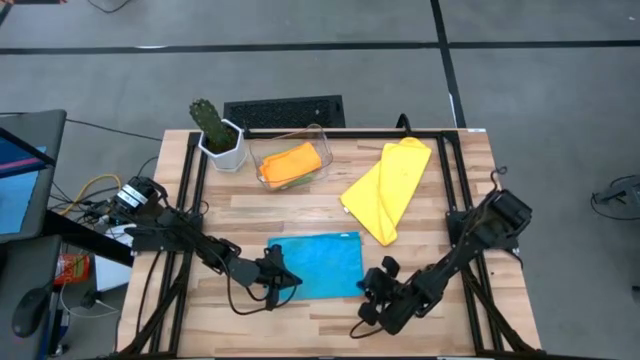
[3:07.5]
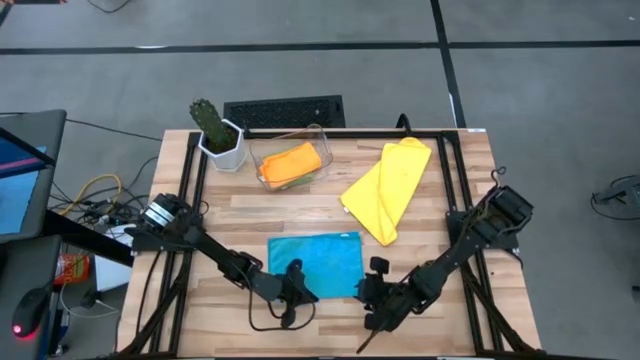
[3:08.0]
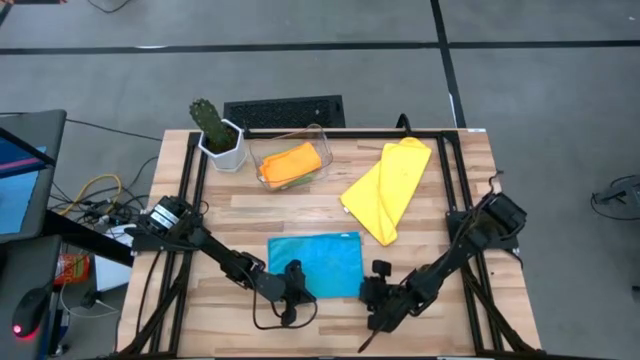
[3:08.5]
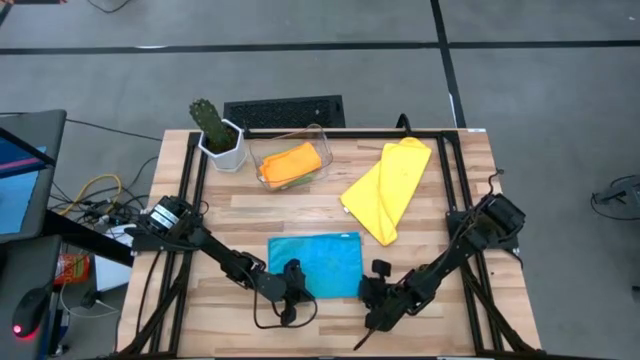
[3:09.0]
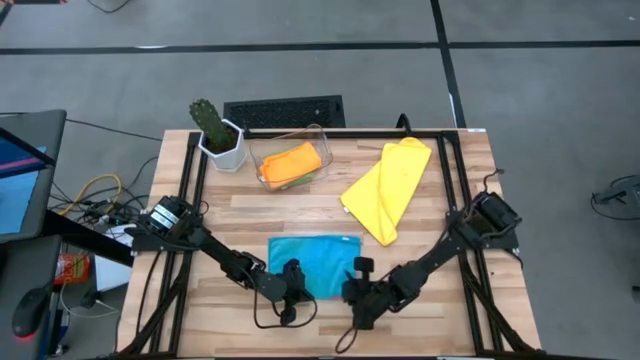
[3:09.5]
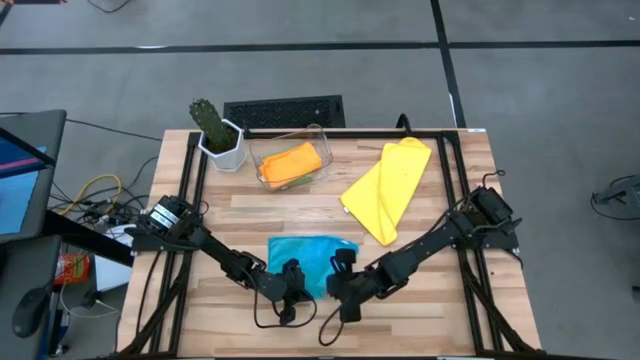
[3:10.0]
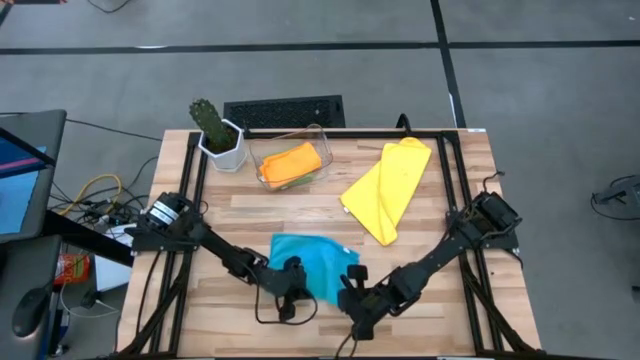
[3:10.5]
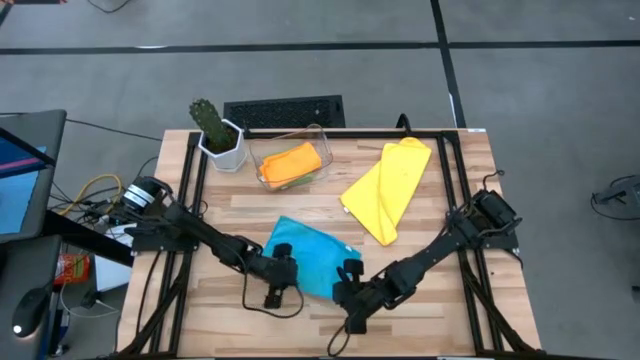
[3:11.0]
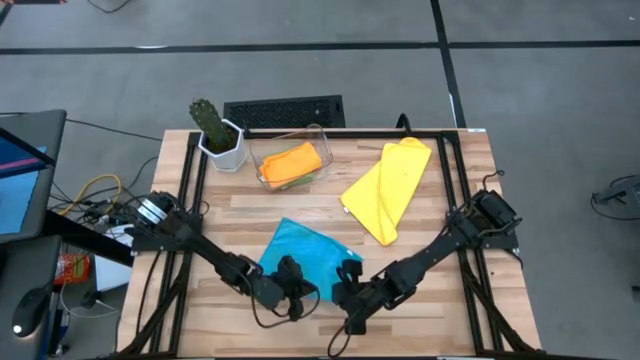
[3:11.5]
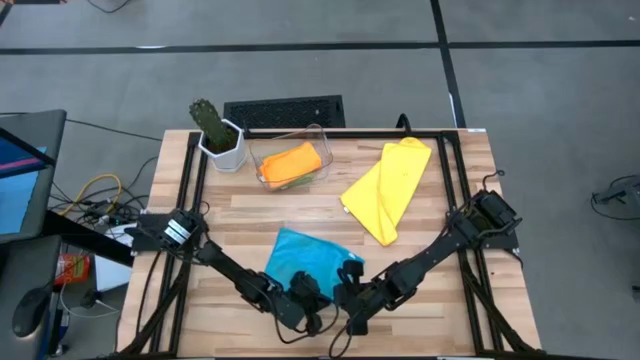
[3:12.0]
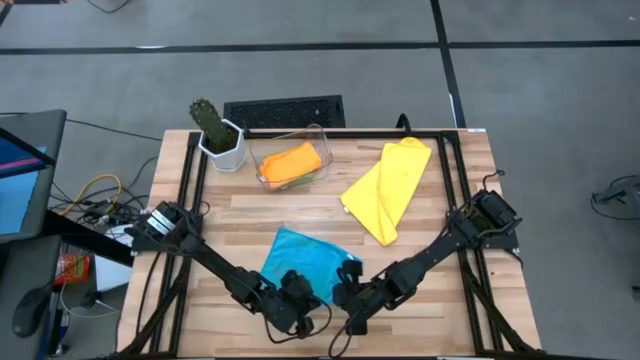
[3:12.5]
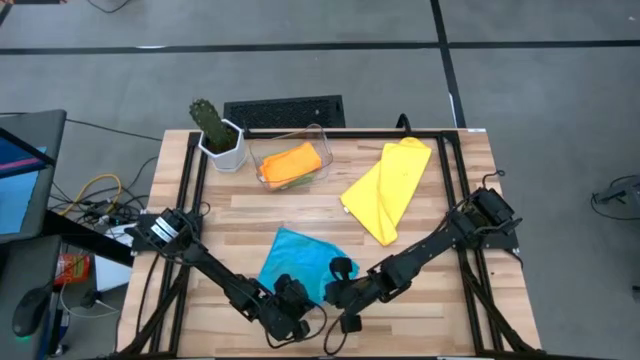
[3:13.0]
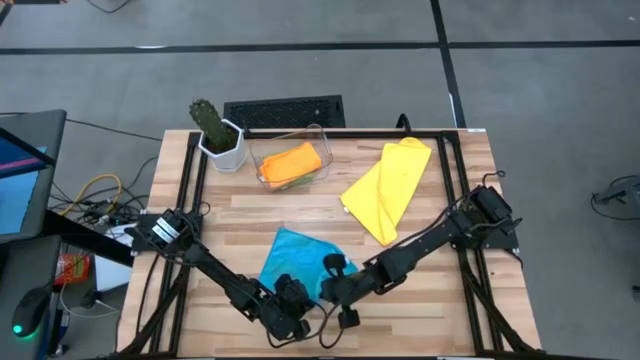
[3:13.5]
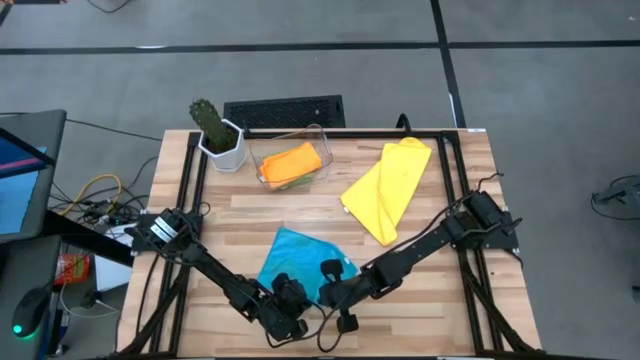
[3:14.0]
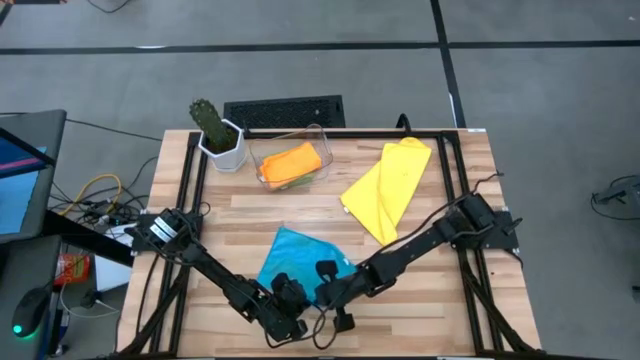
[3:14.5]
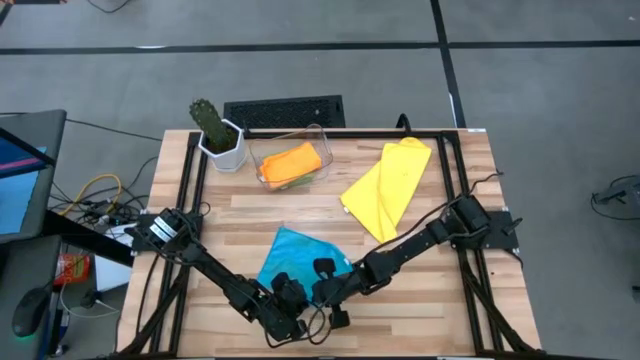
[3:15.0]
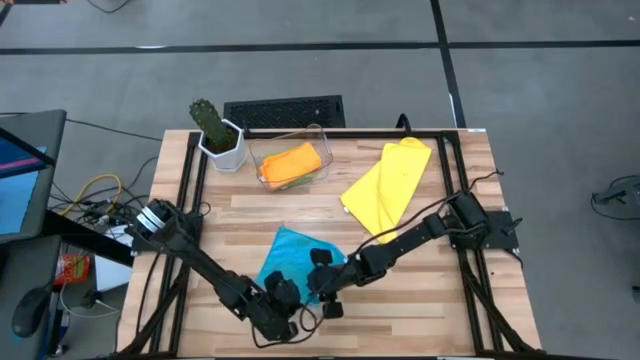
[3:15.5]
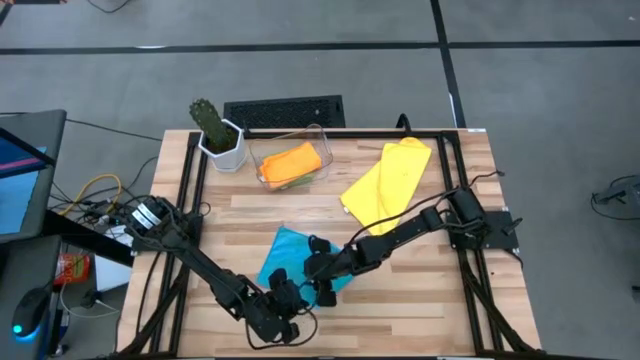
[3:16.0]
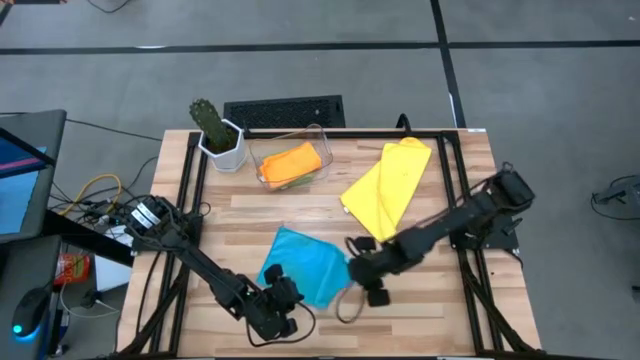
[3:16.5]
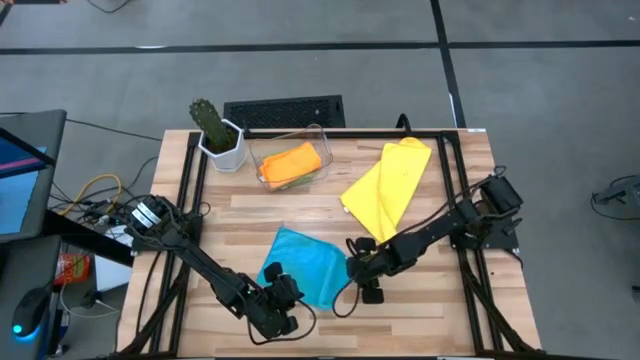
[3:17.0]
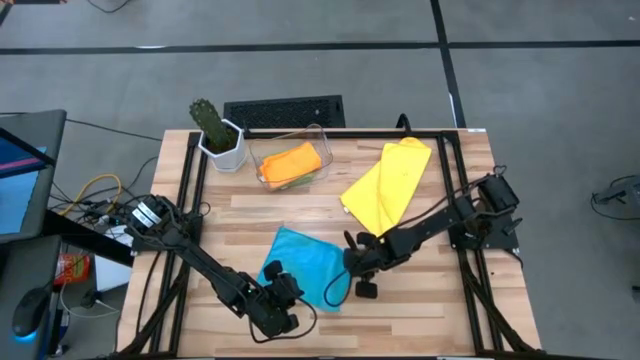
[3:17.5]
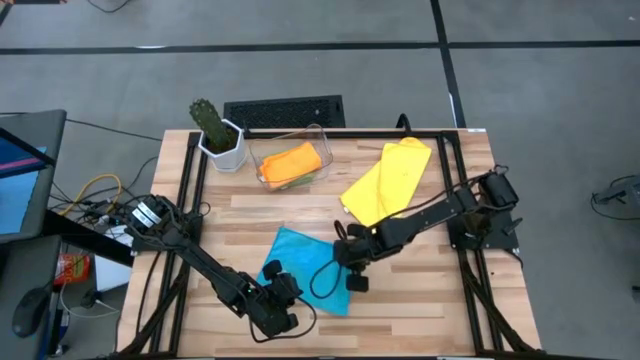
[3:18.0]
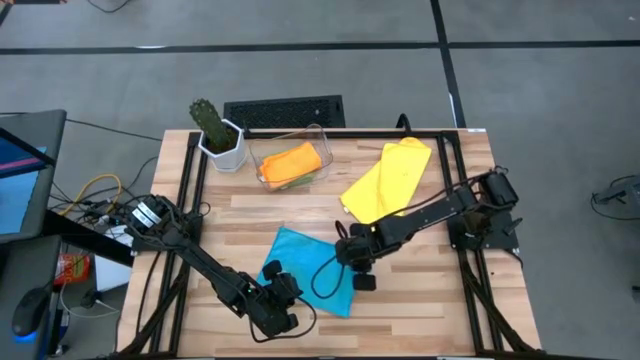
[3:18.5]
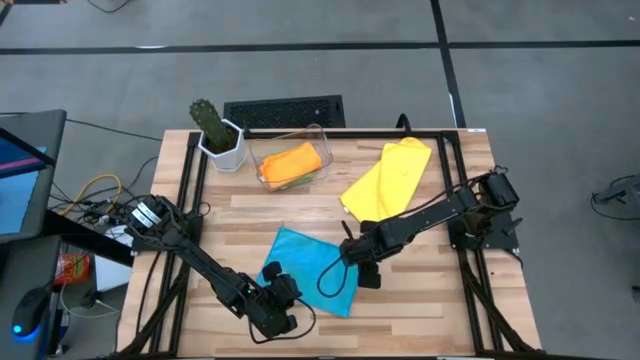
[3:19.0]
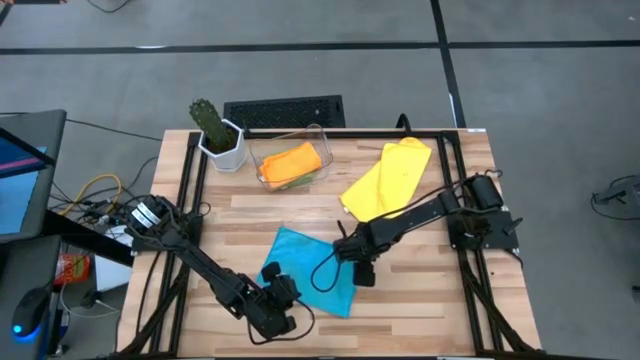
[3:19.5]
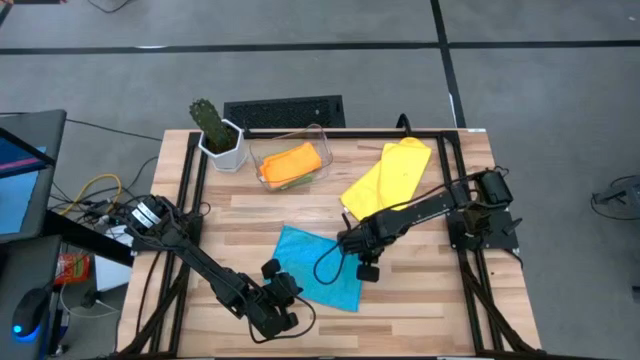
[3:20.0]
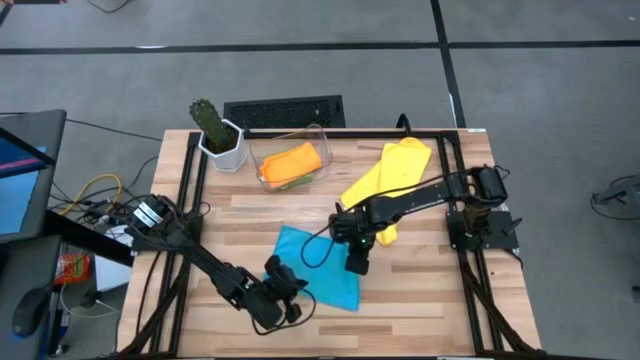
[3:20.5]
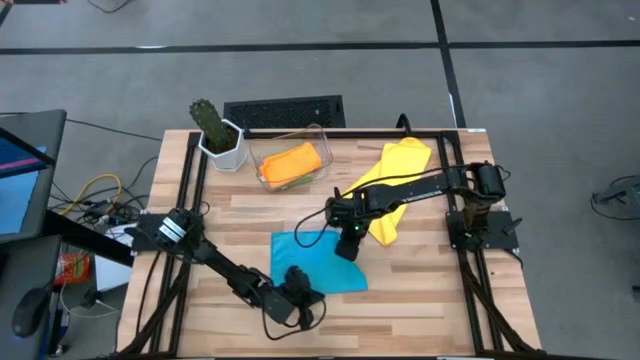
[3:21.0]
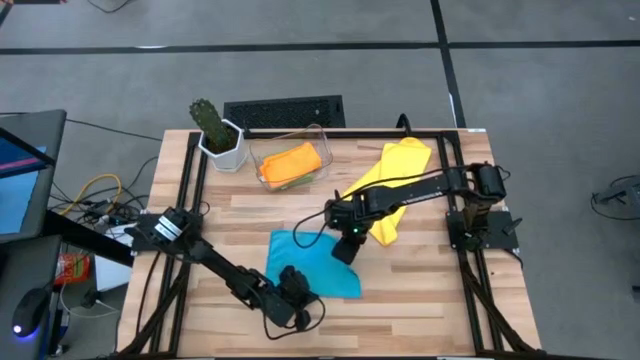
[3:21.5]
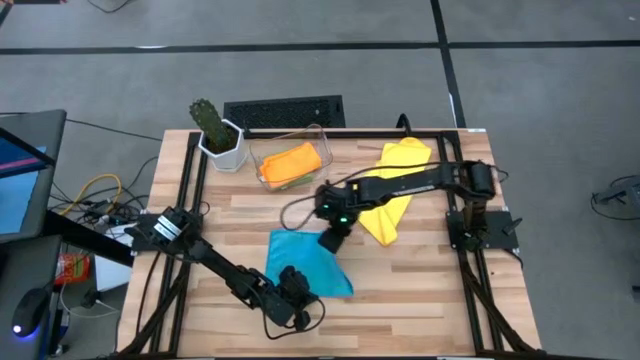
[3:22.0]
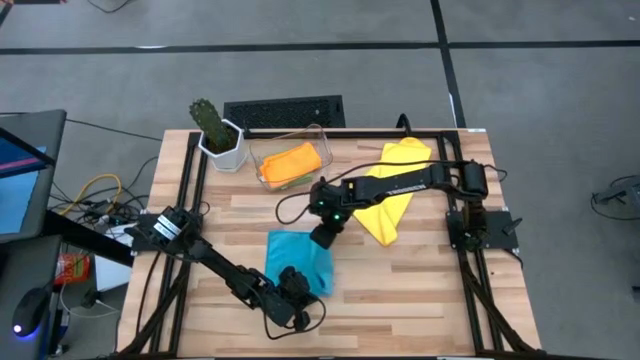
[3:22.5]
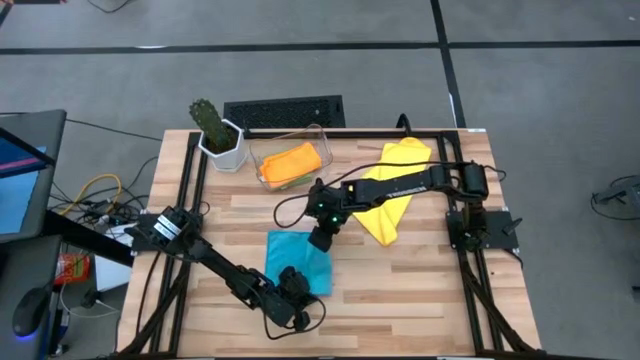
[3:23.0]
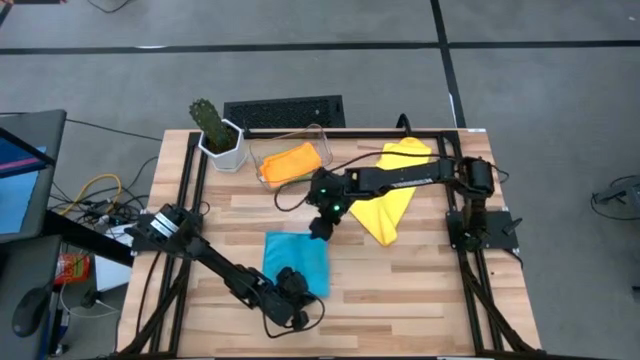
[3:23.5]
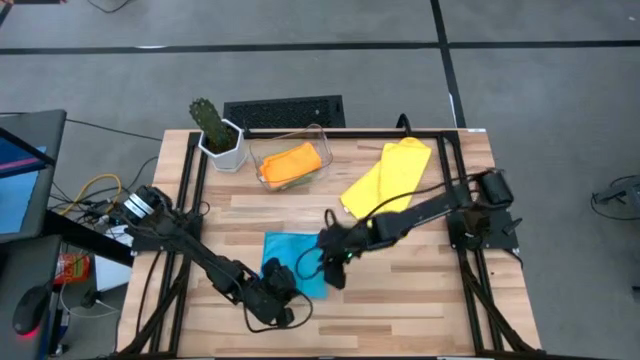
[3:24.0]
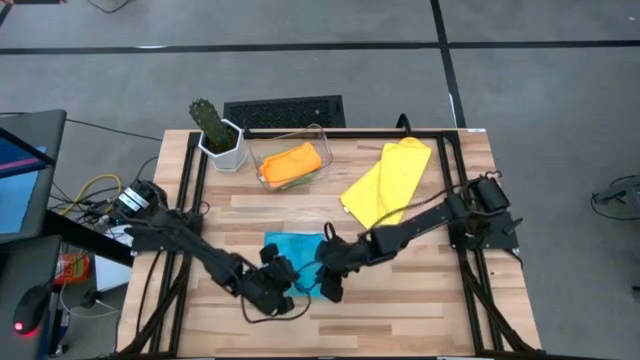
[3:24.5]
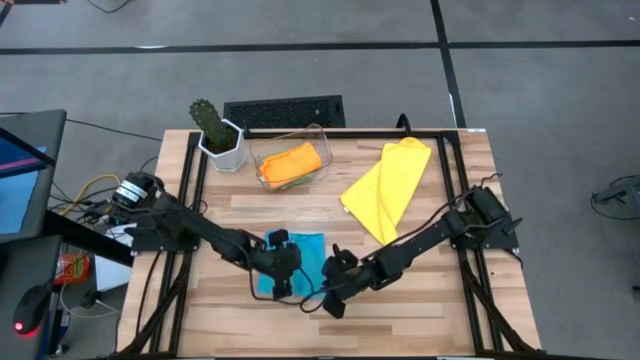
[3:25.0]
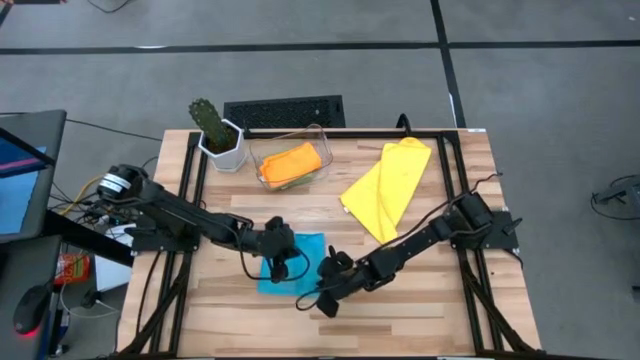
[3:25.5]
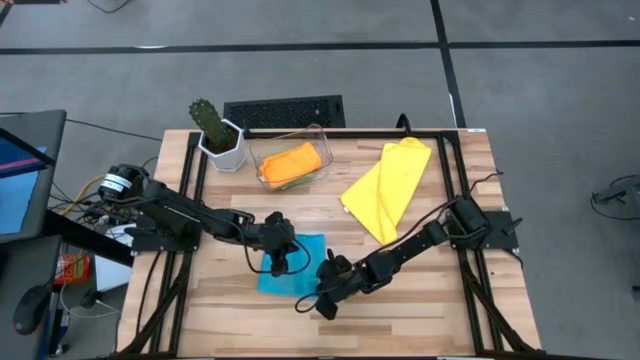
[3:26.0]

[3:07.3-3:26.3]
Task: Fold microfiber towels
Fold the blue microfiber cloth
